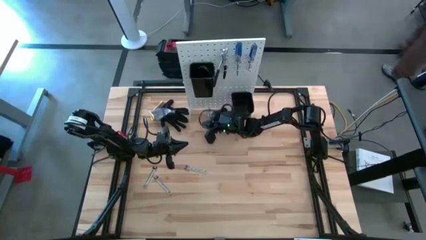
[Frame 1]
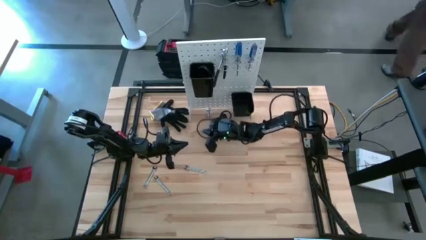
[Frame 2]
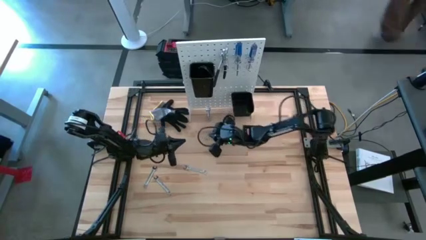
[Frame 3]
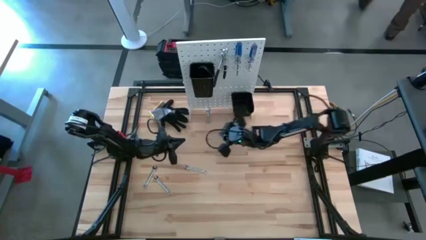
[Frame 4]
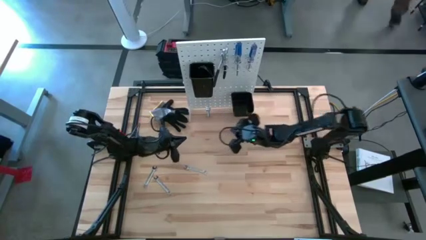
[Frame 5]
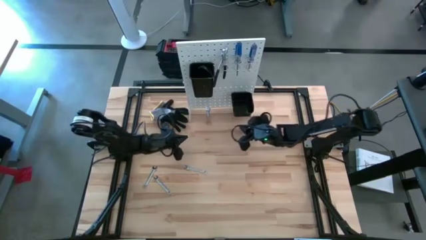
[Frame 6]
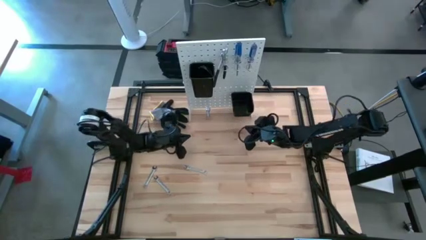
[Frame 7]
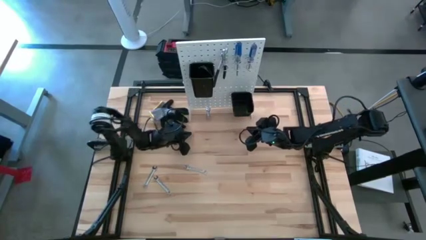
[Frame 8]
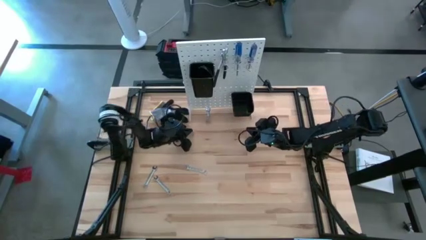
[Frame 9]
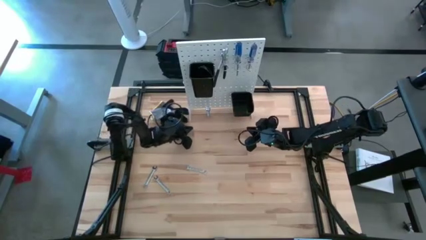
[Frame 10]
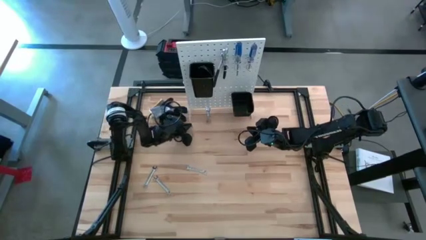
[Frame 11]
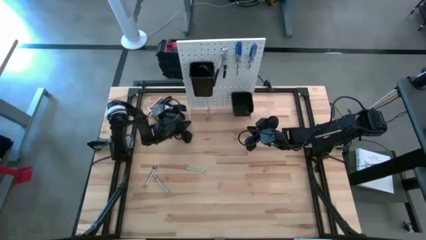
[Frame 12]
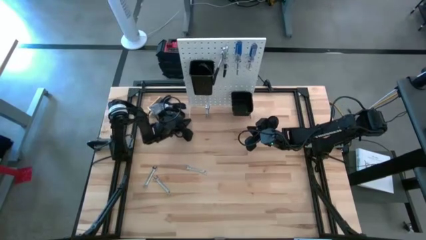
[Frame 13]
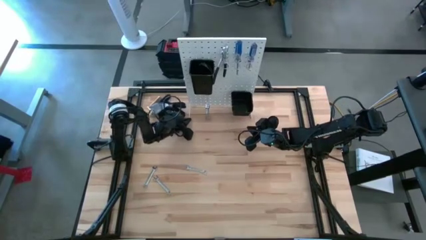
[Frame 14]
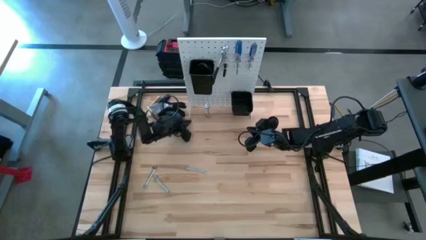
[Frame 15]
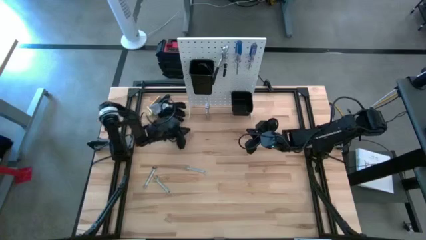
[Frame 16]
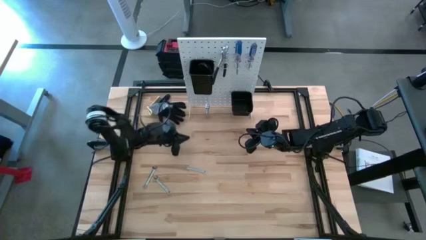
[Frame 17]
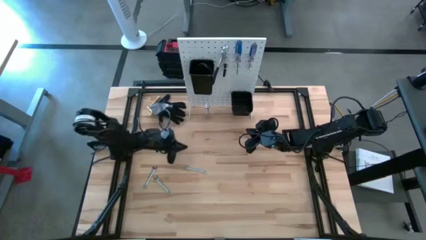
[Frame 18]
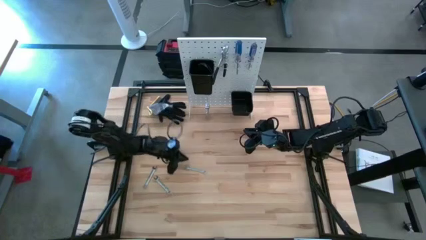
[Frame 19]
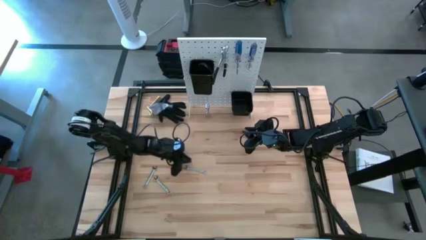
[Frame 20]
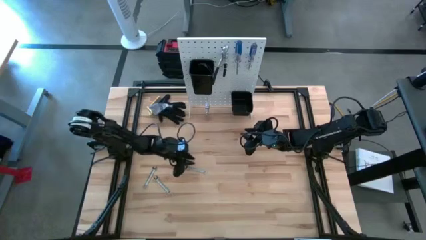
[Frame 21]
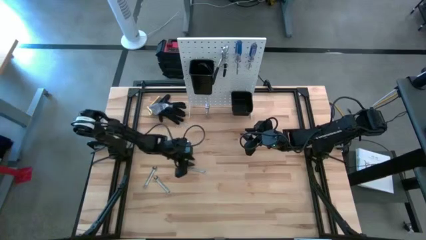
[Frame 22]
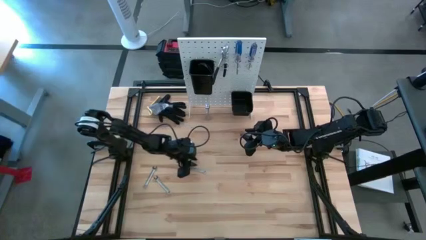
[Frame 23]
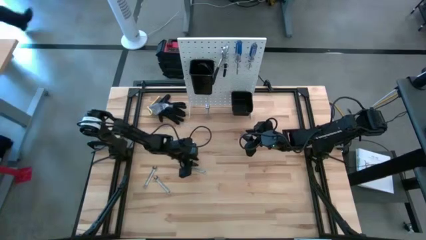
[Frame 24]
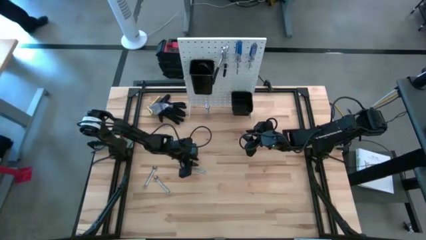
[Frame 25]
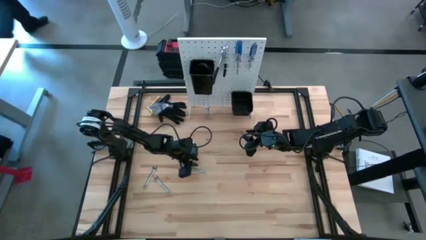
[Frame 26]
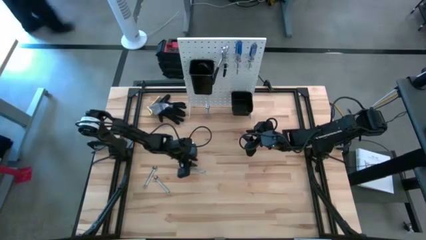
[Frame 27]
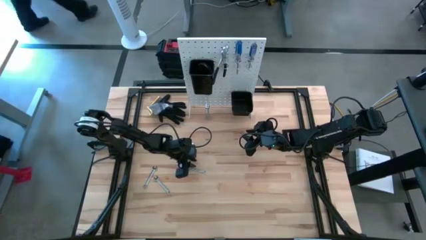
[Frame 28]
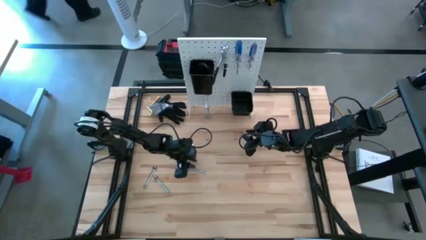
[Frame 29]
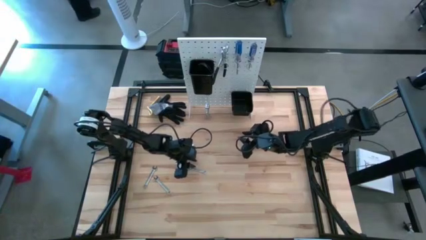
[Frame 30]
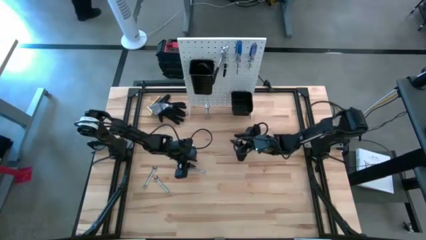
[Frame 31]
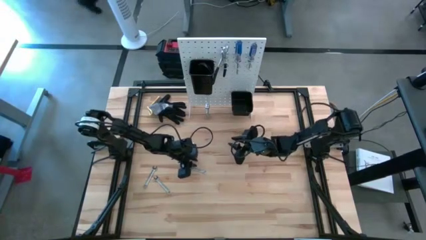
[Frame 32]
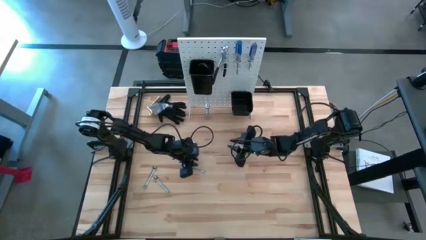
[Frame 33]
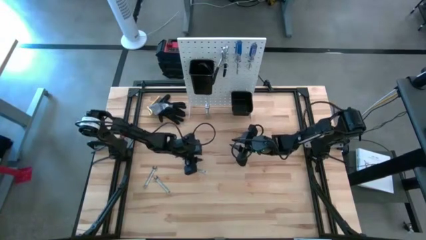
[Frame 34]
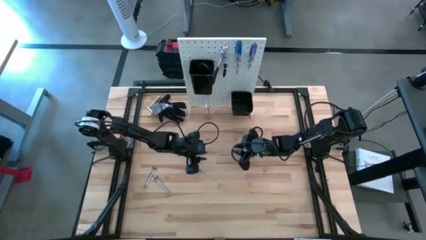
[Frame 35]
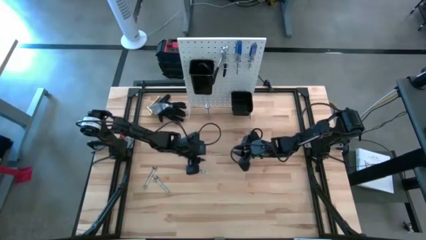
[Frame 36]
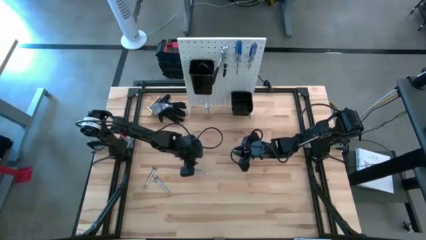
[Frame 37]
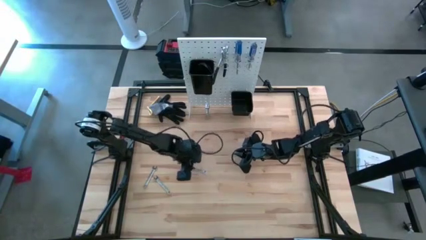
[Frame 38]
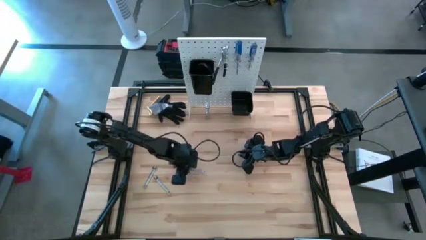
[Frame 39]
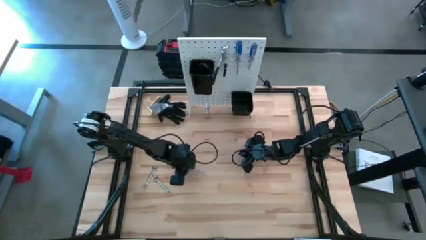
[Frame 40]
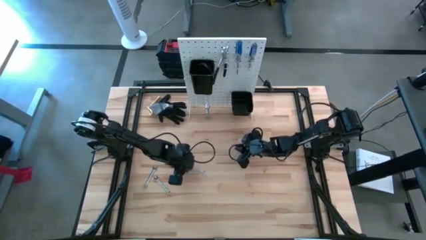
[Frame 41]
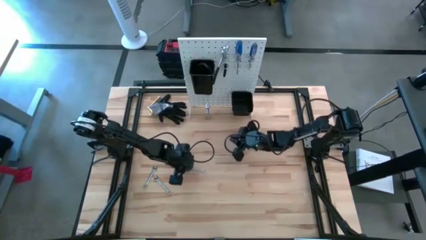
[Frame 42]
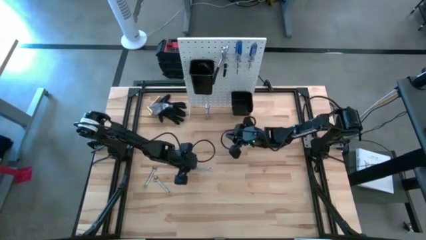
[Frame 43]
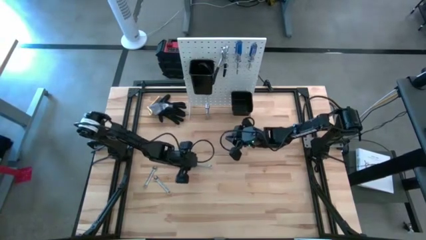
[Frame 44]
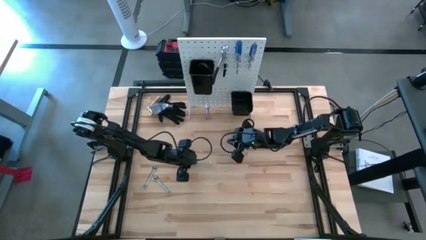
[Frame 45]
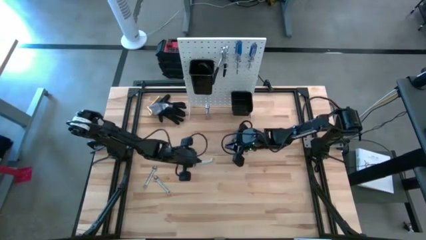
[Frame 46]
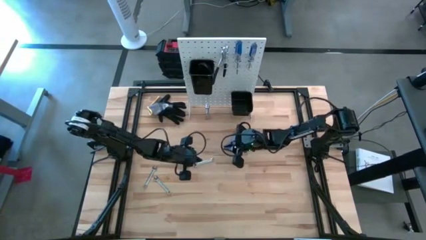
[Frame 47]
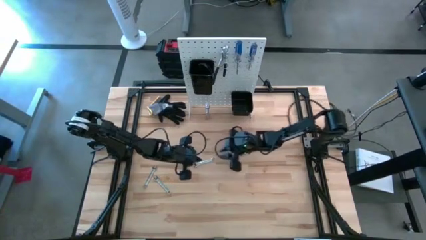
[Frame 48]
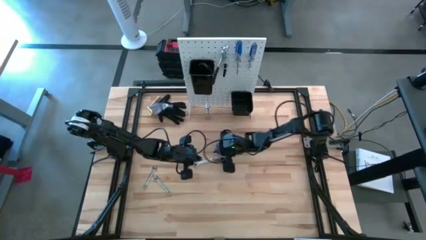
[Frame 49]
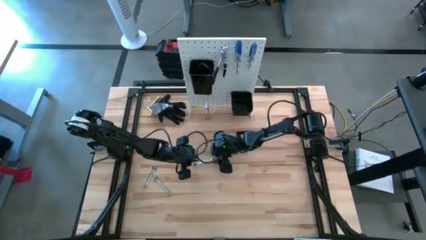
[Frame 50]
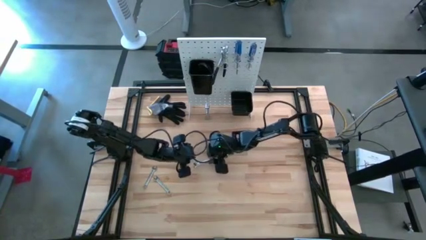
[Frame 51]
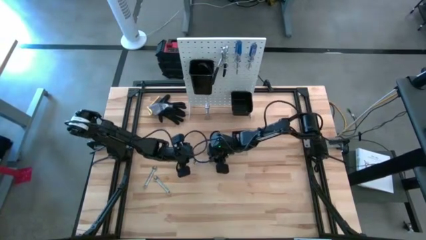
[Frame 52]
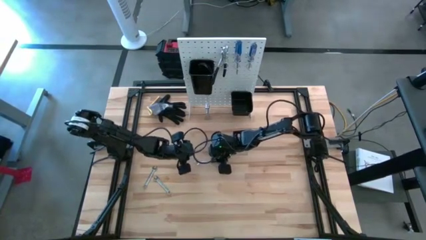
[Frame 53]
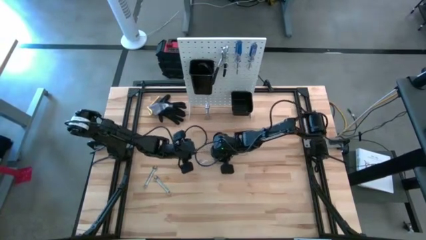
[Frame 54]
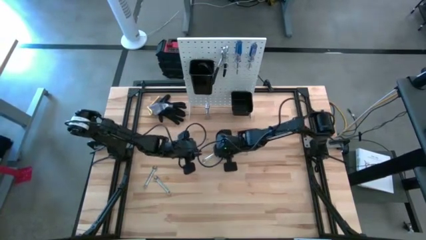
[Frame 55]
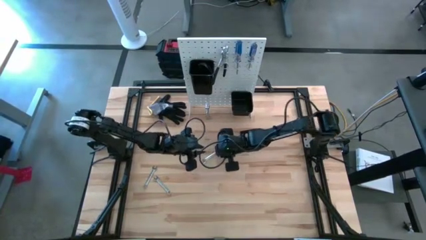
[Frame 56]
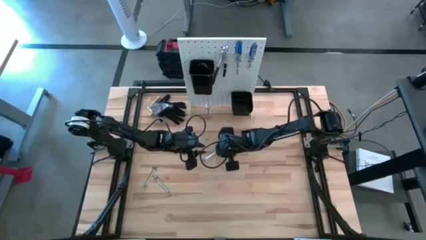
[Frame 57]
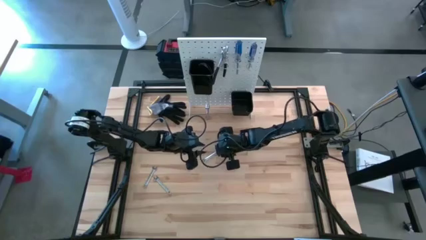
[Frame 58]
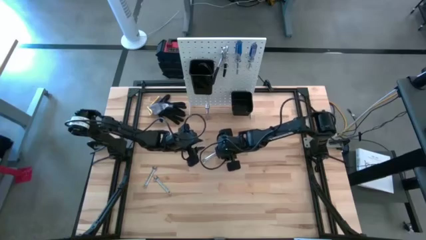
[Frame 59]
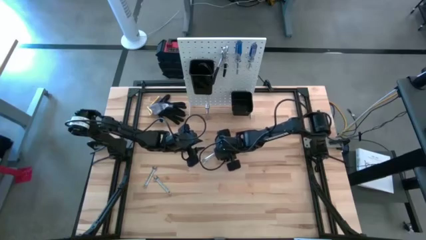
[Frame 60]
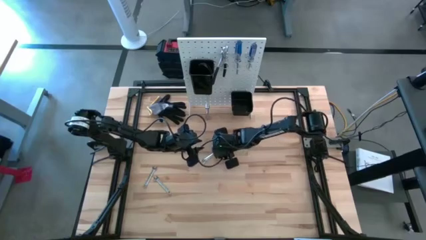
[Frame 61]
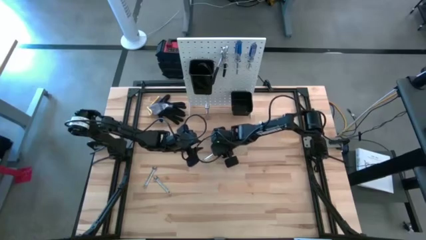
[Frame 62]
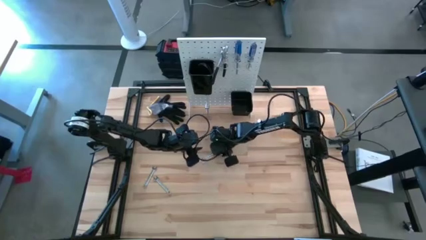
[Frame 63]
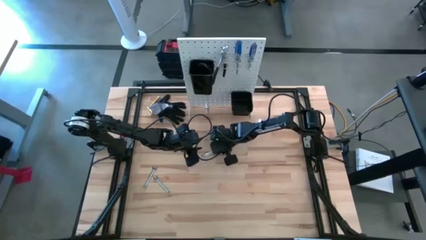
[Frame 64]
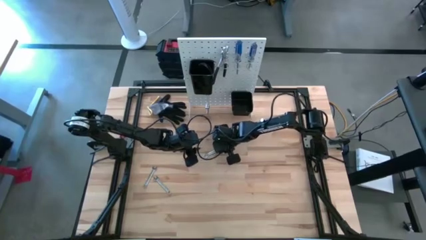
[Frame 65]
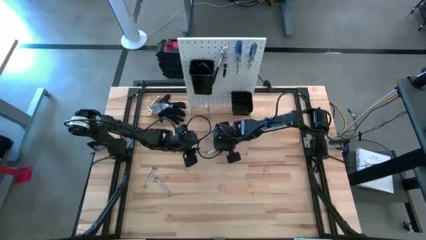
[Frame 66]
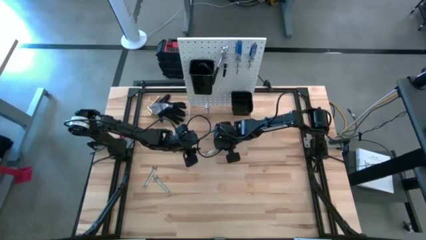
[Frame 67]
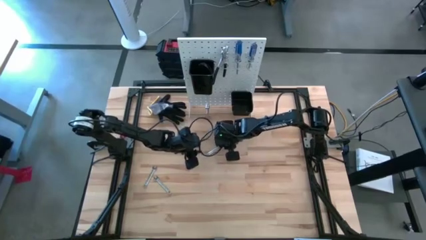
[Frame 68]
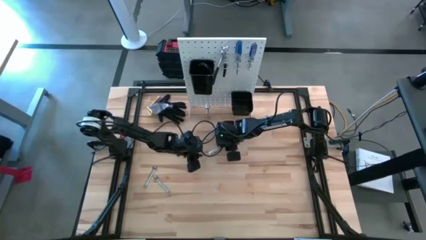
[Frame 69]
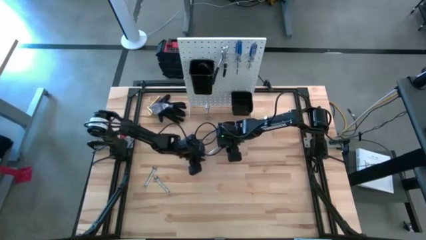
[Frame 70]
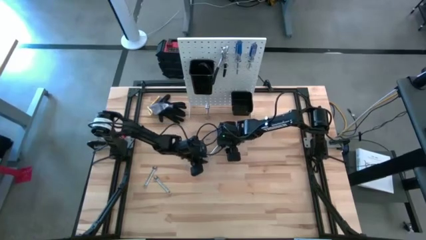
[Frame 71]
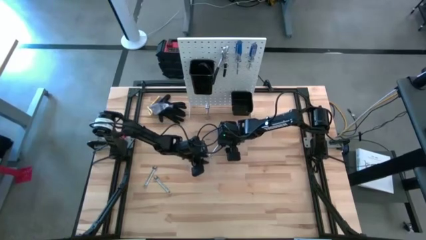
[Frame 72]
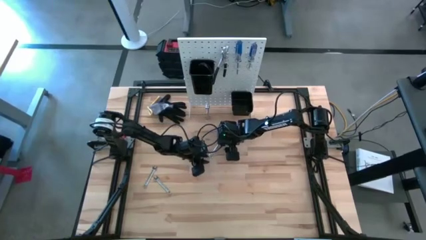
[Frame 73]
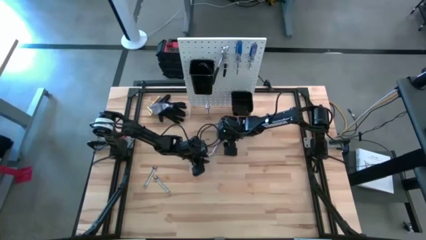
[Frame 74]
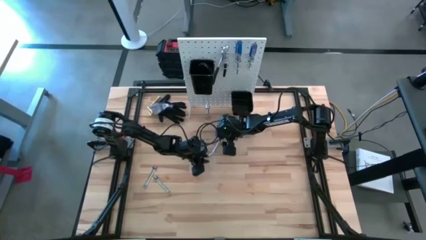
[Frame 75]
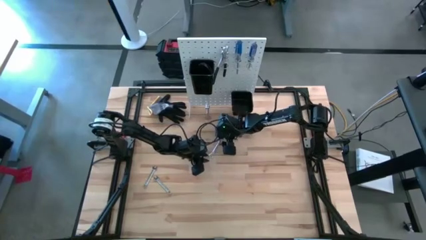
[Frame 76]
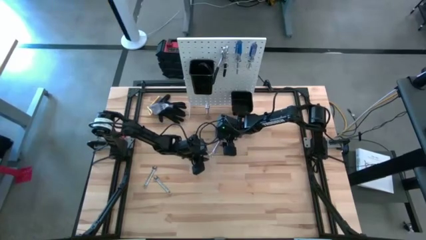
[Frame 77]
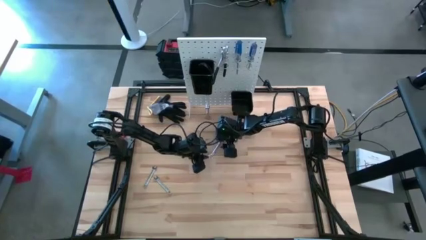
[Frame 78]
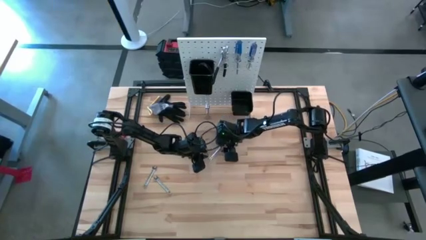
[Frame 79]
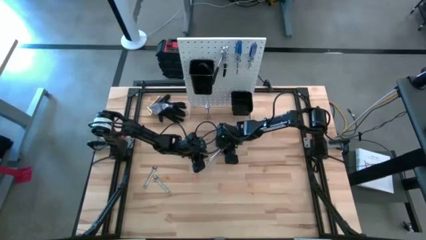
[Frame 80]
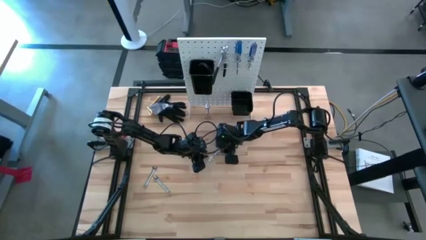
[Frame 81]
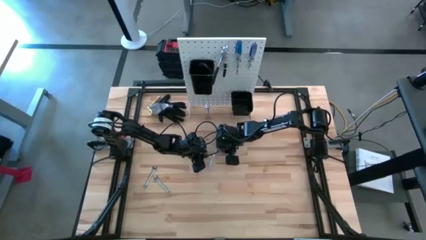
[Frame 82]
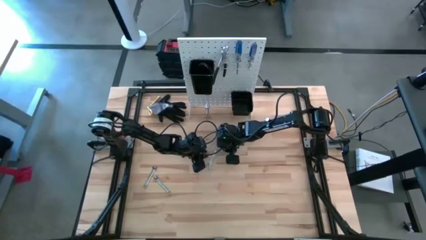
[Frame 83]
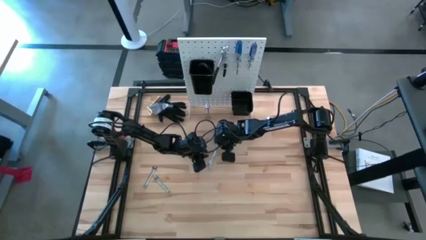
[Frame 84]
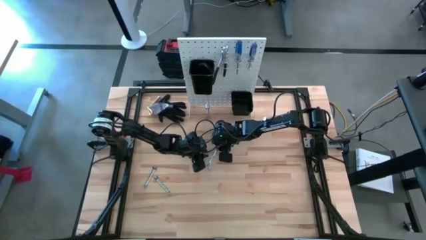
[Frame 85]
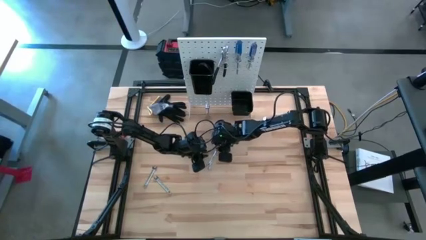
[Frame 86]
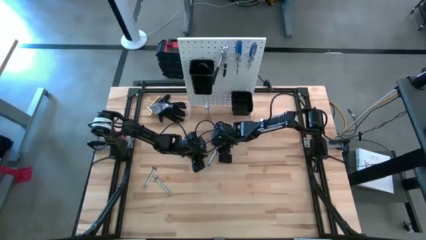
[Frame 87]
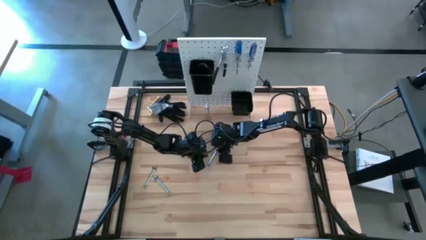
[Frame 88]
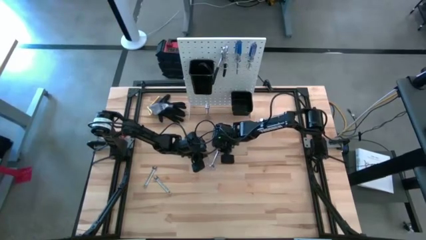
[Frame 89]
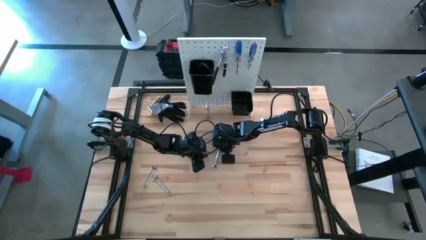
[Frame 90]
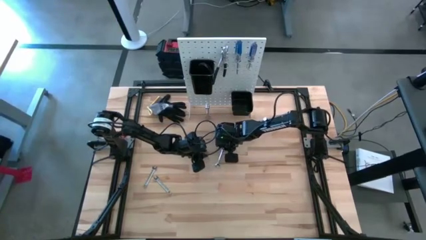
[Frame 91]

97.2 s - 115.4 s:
Task: Hang tools onto peg board
Hang the wrench on the peg board
